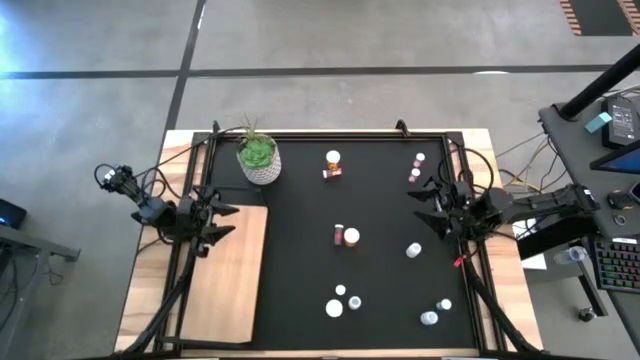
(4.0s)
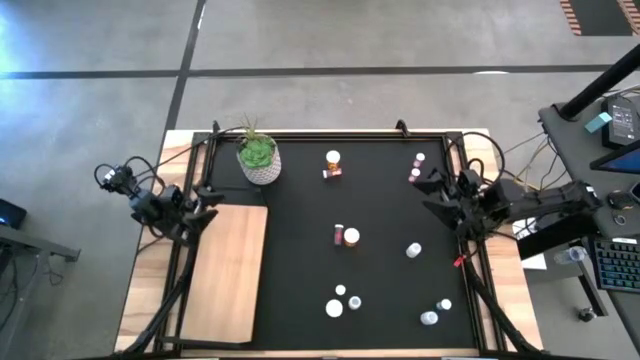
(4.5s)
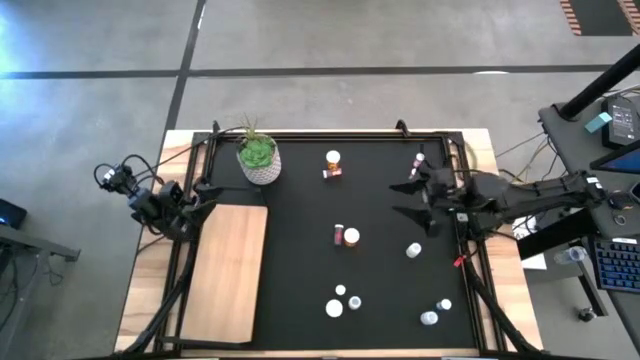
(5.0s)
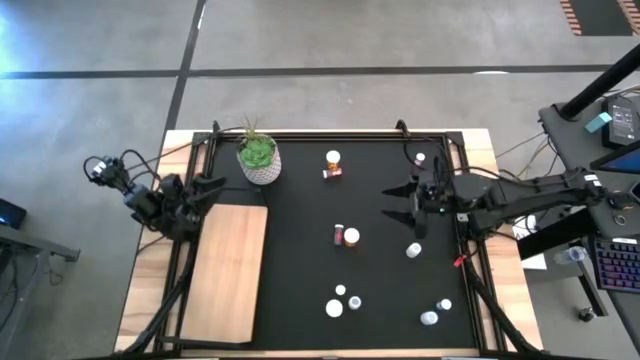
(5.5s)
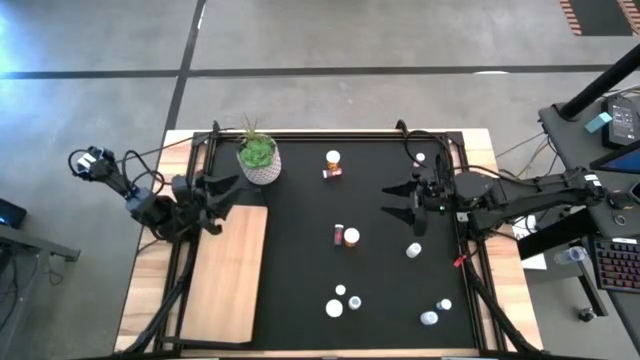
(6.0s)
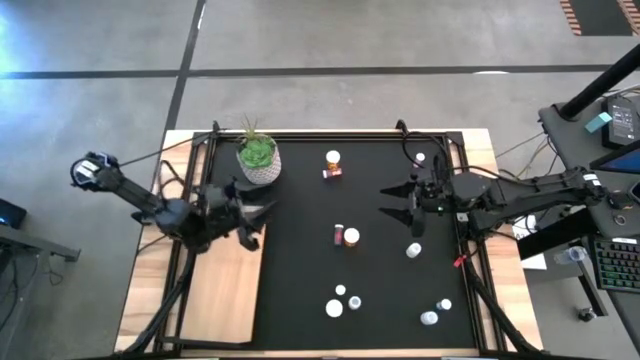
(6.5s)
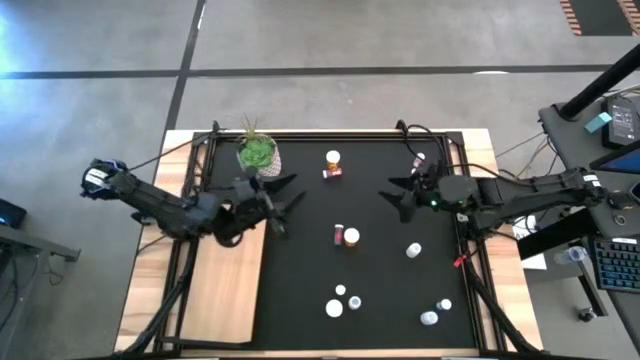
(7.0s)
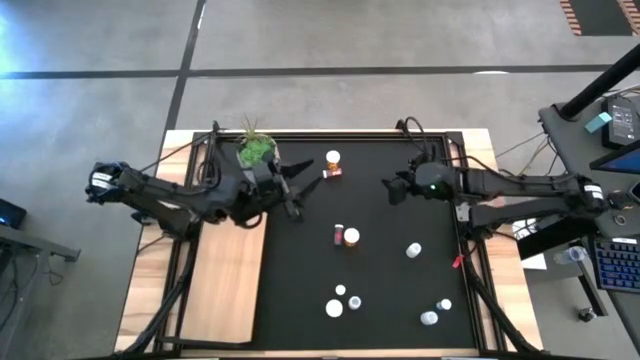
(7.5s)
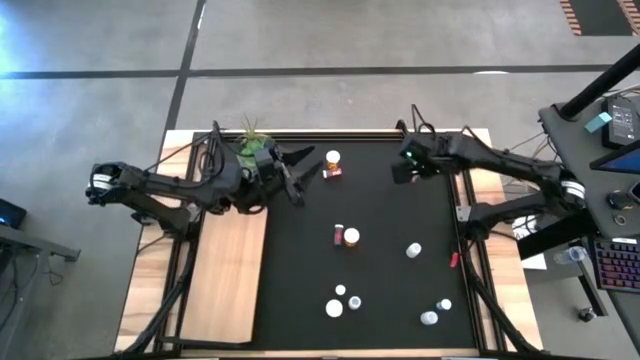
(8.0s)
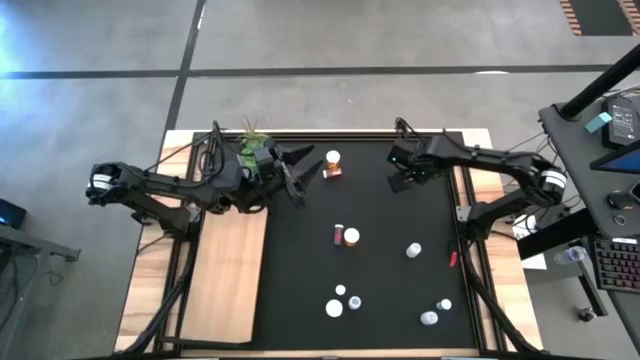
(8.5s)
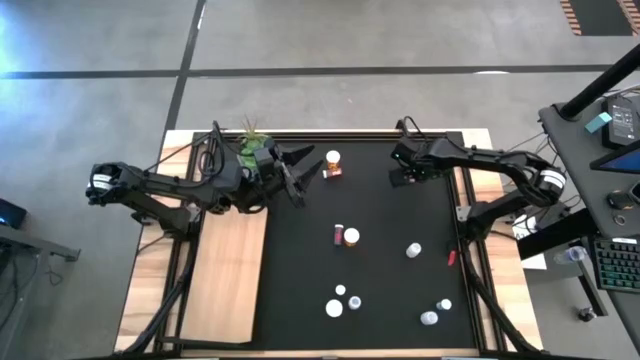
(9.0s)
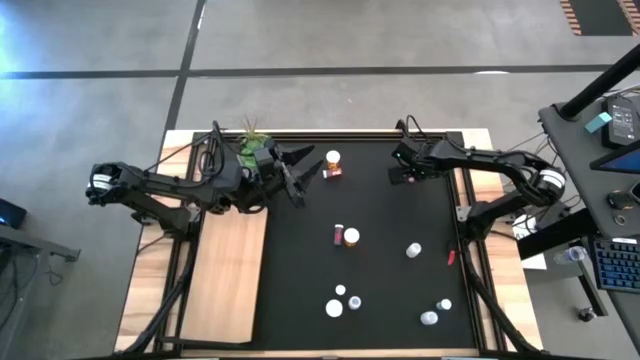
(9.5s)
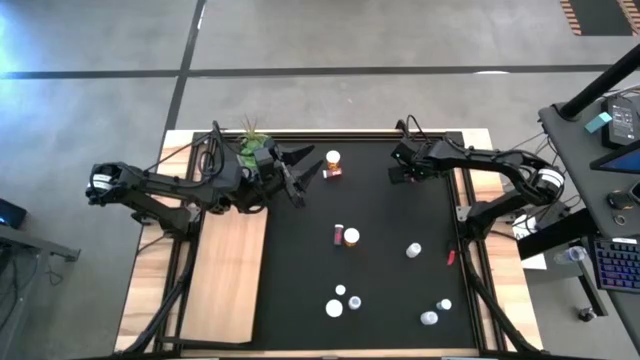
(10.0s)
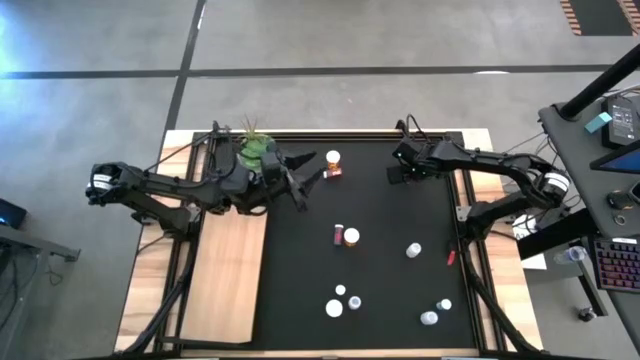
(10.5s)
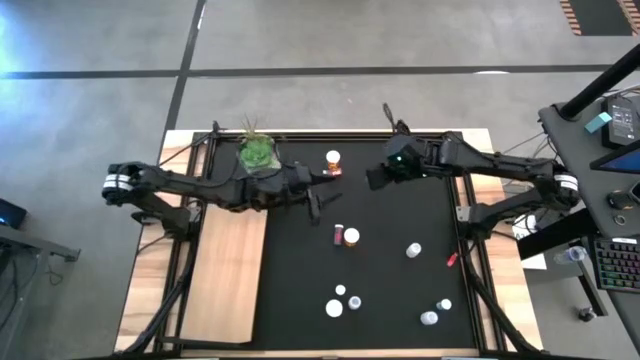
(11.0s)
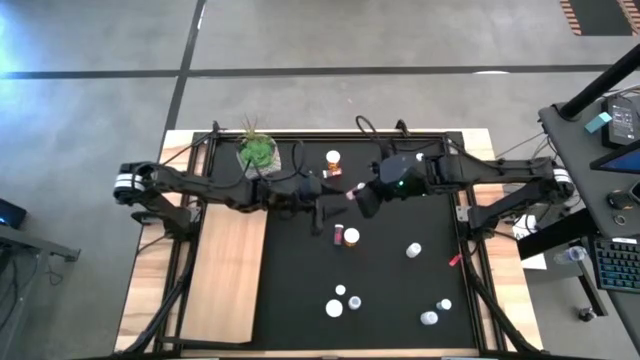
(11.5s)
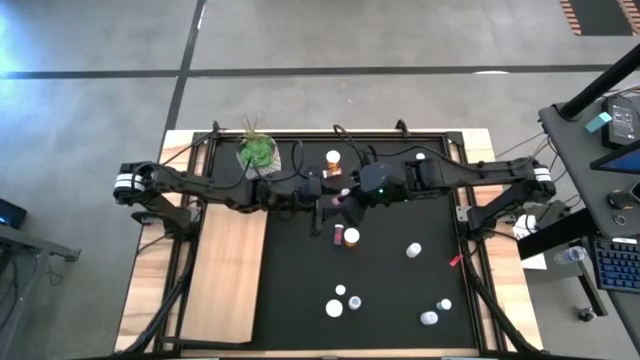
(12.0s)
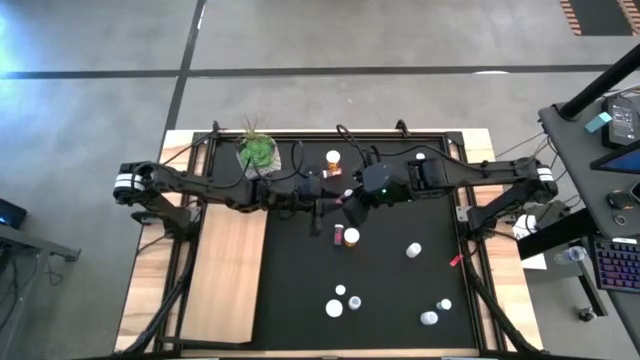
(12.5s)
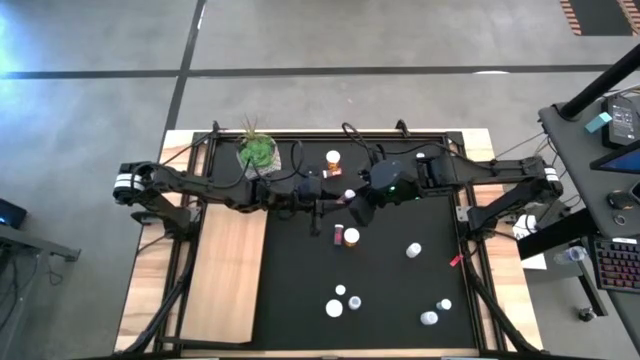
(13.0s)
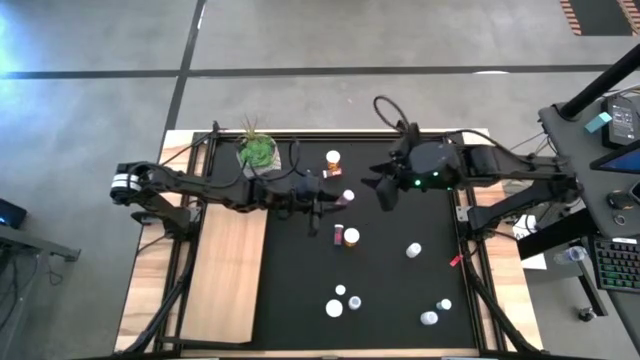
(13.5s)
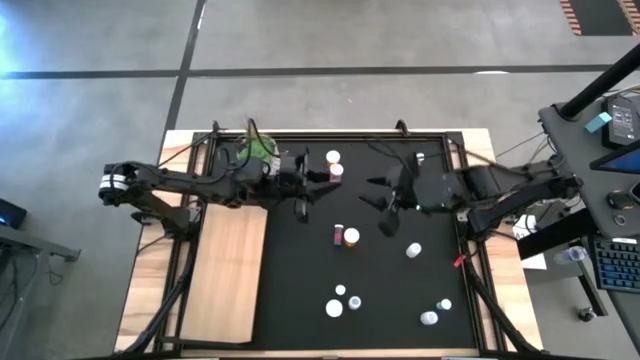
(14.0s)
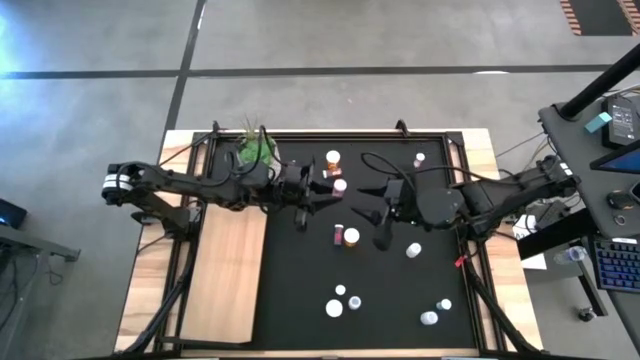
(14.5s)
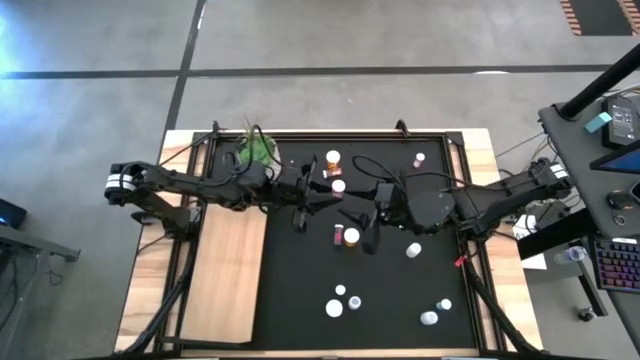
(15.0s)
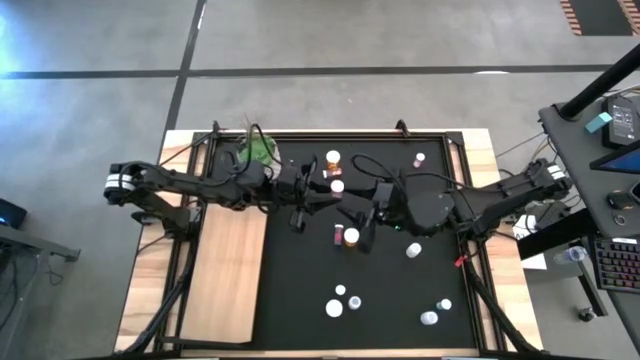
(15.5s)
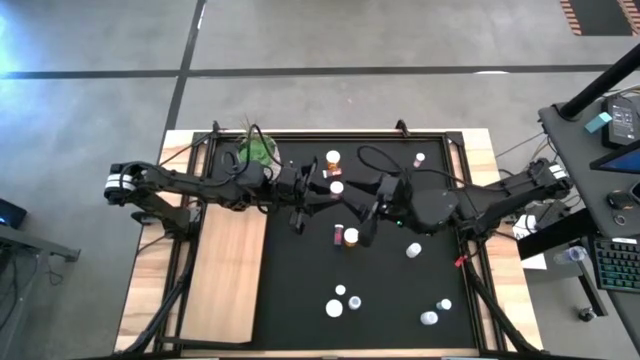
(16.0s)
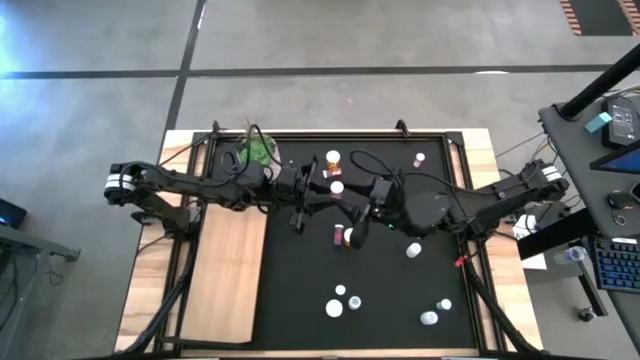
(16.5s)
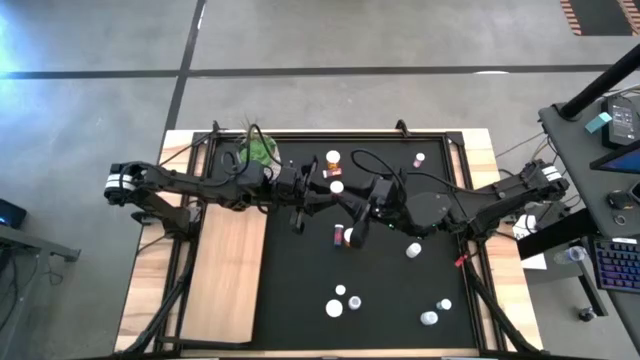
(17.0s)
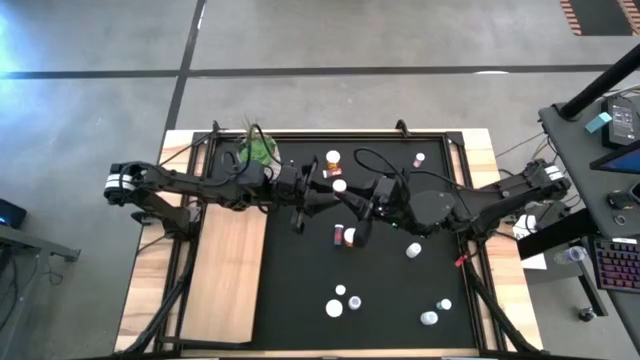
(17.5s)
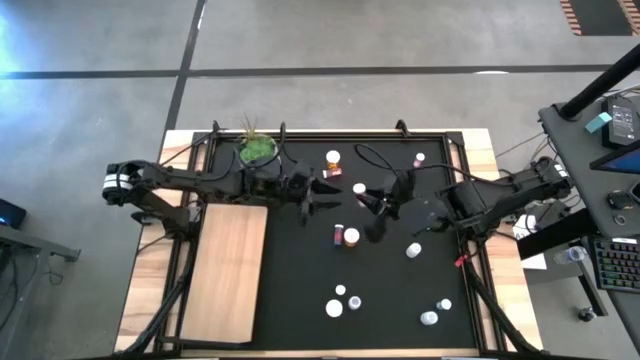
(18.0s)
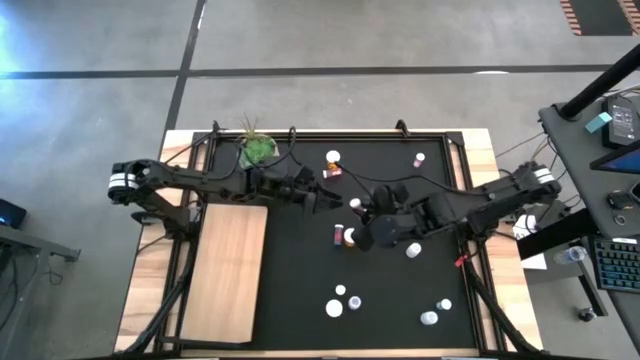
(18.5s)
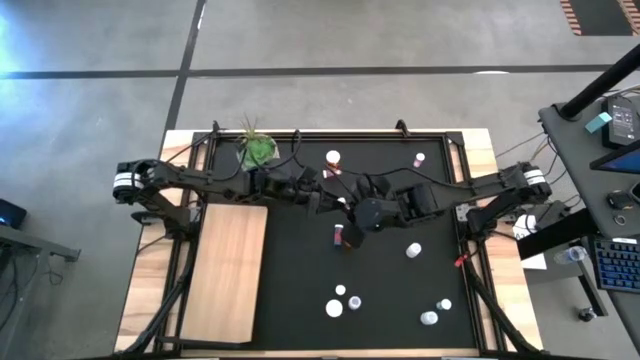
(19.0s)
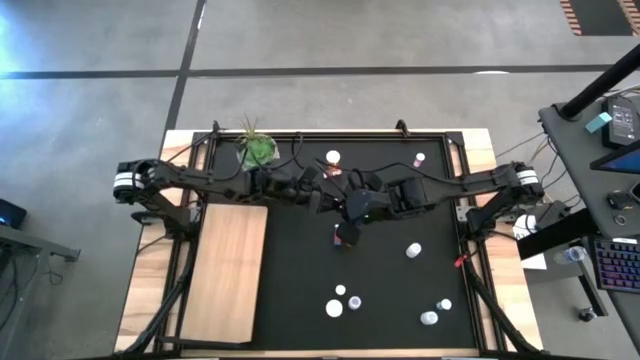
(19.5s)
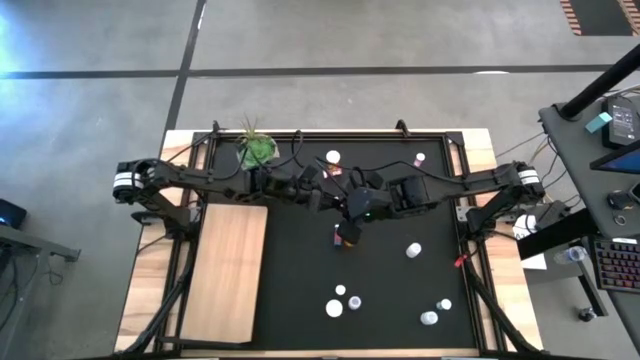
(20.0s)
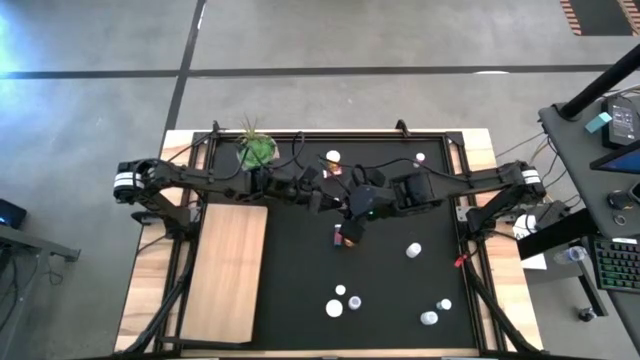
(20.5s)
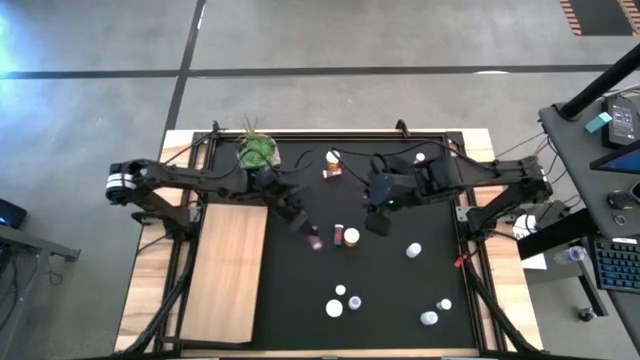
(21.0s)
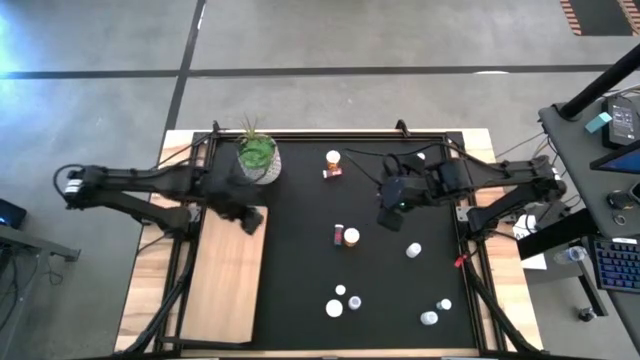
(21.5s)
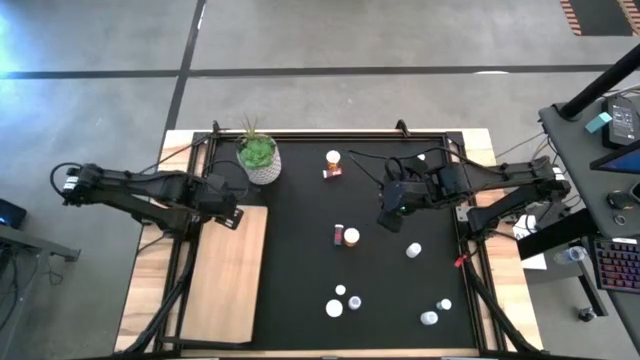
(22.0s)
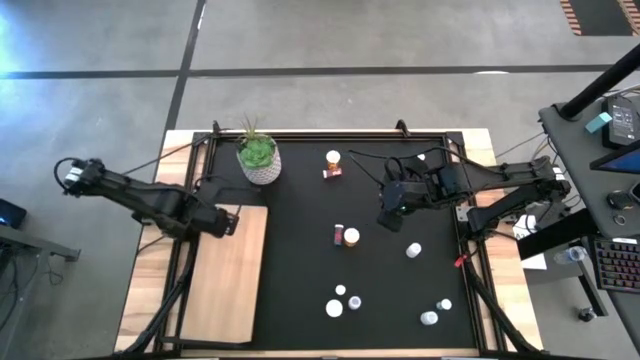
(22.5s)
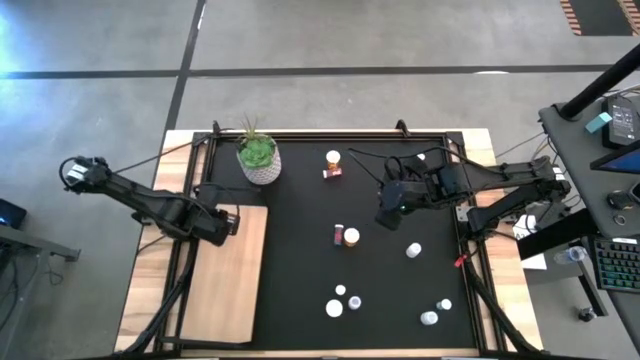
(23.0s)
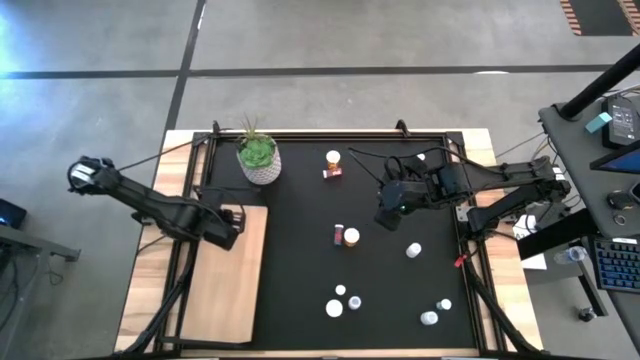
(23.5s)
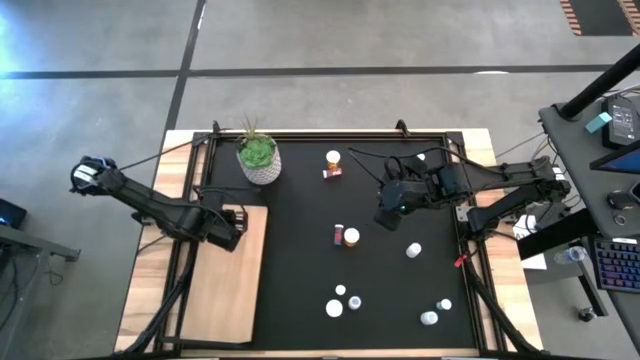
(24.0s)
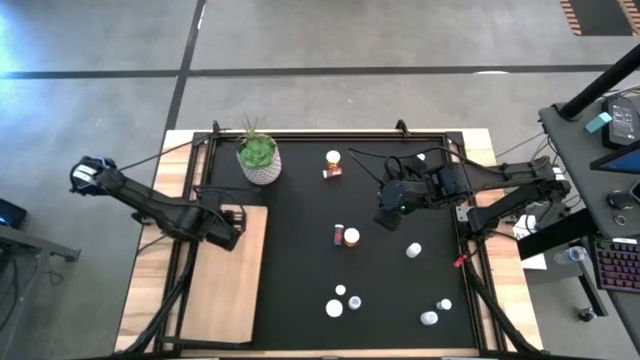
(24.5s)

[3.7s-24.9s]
Task: Pick and place medicine bottles onto shelf by color
Put the bottom pink pill bottle on the shelf
